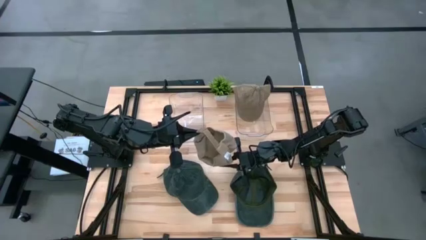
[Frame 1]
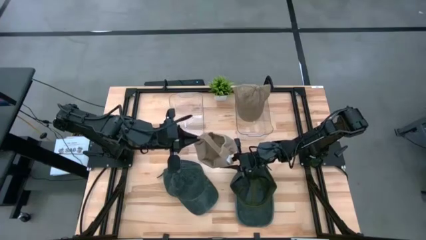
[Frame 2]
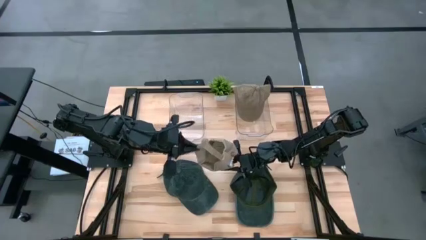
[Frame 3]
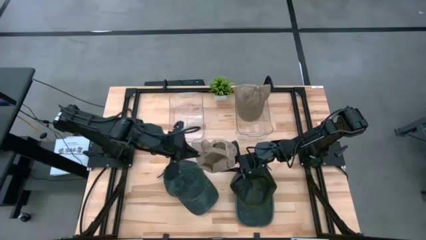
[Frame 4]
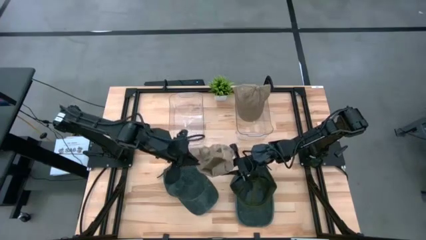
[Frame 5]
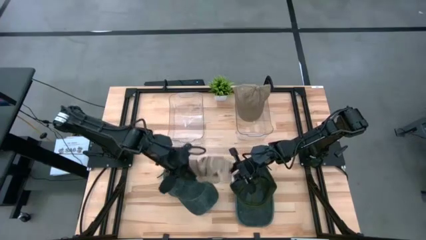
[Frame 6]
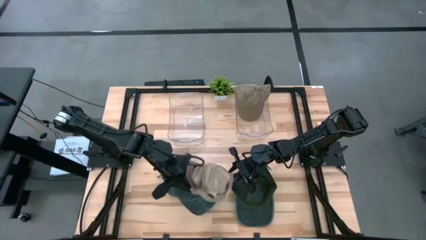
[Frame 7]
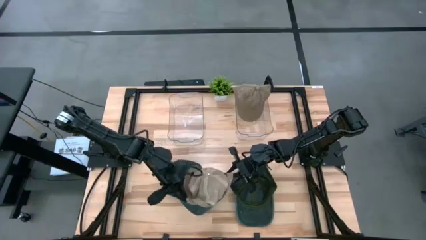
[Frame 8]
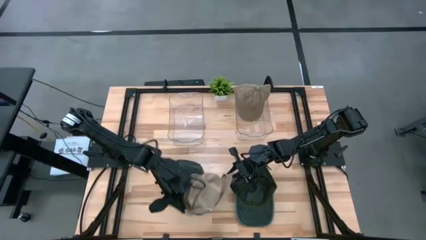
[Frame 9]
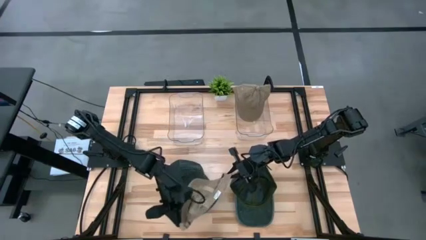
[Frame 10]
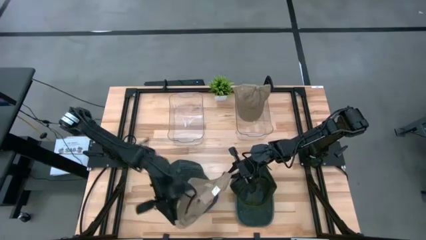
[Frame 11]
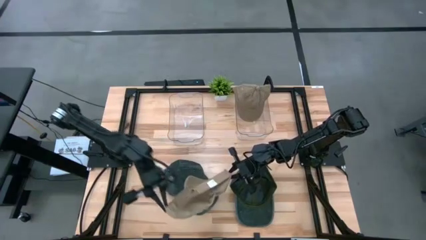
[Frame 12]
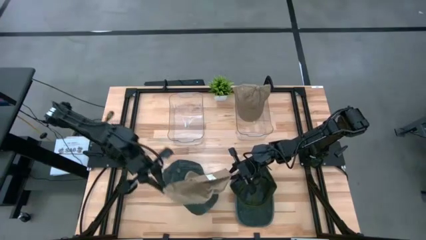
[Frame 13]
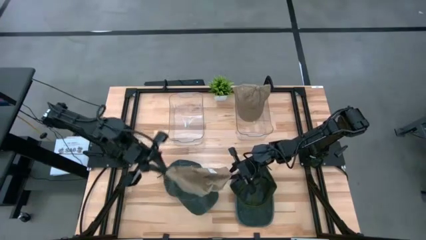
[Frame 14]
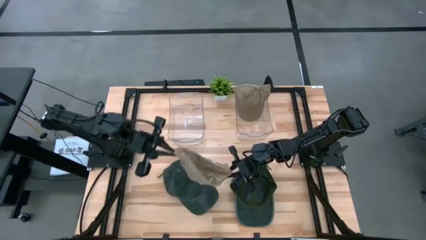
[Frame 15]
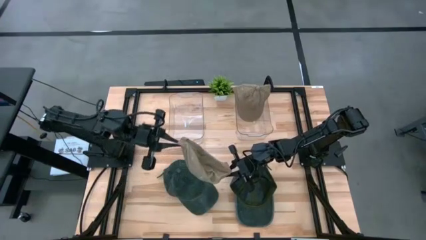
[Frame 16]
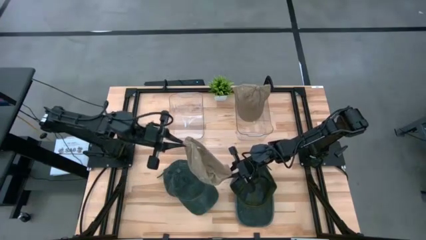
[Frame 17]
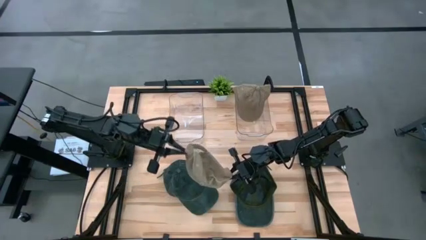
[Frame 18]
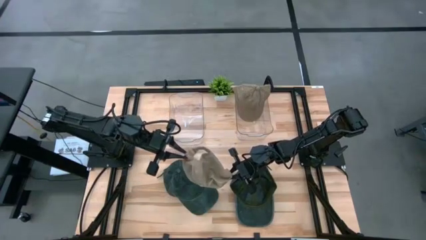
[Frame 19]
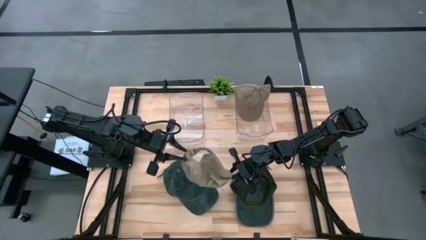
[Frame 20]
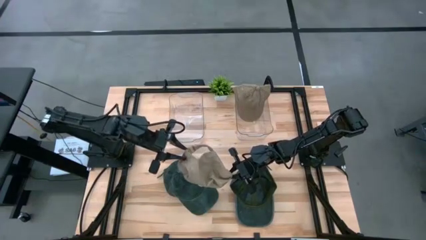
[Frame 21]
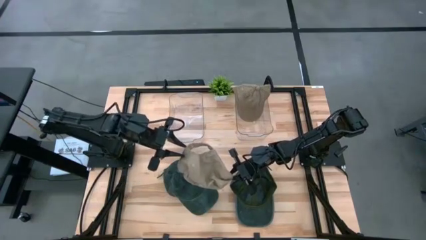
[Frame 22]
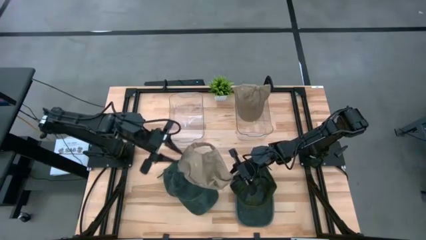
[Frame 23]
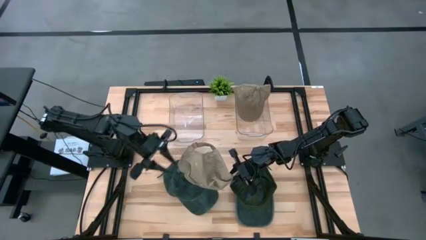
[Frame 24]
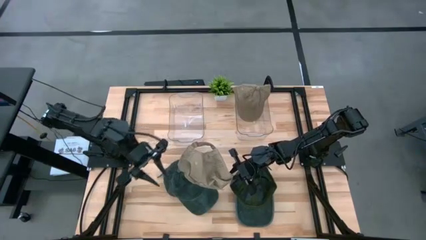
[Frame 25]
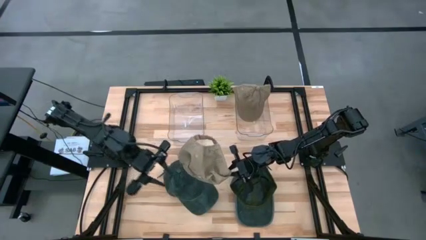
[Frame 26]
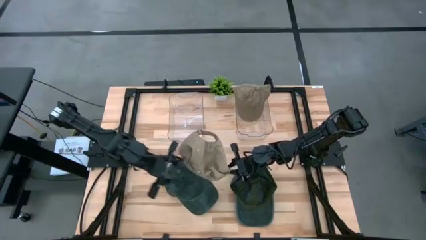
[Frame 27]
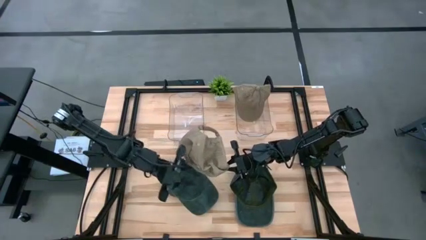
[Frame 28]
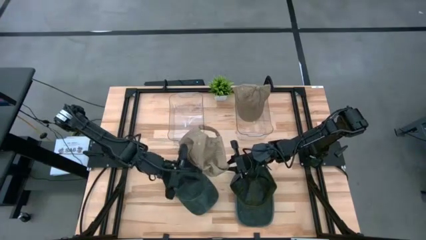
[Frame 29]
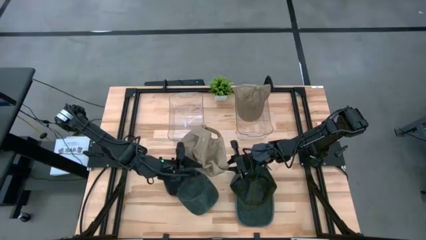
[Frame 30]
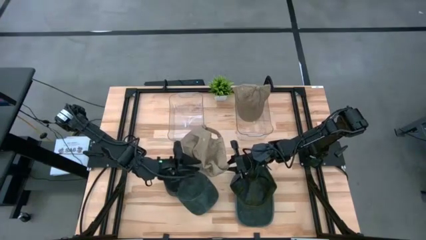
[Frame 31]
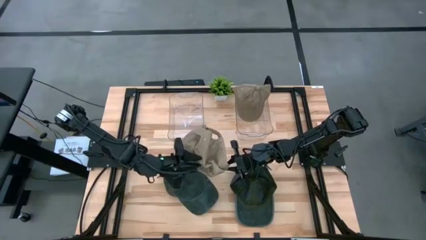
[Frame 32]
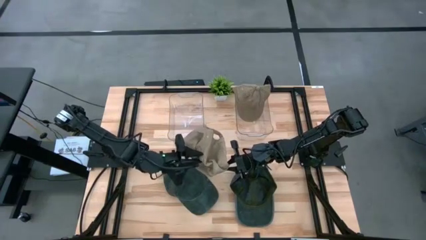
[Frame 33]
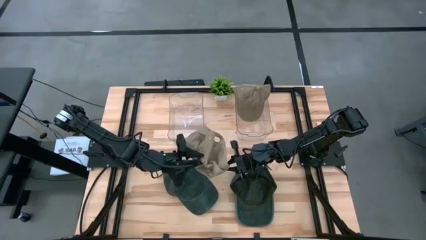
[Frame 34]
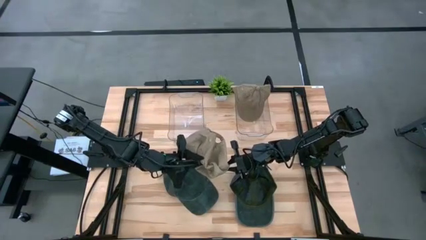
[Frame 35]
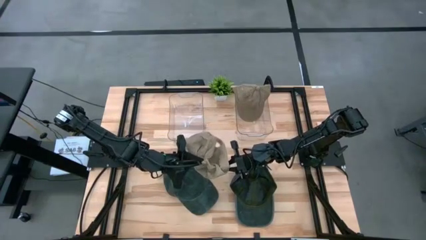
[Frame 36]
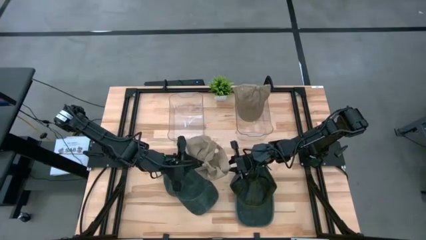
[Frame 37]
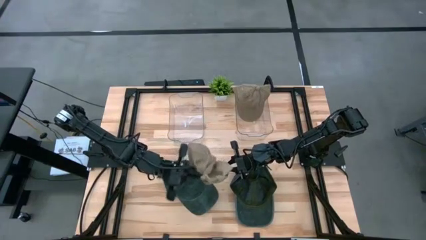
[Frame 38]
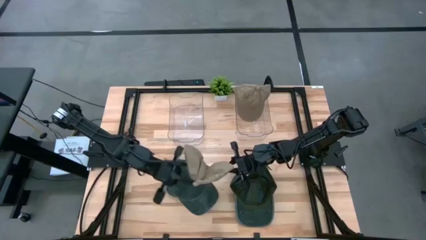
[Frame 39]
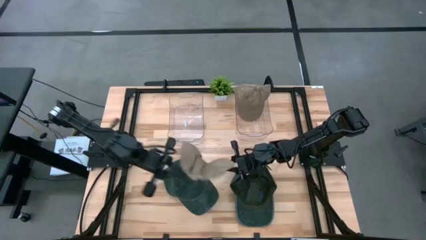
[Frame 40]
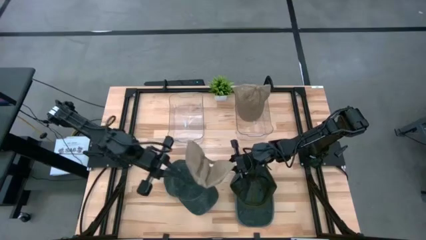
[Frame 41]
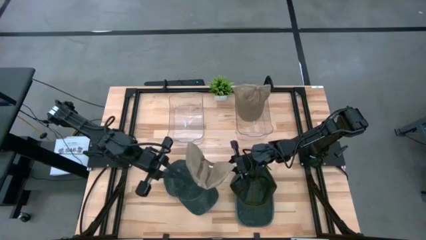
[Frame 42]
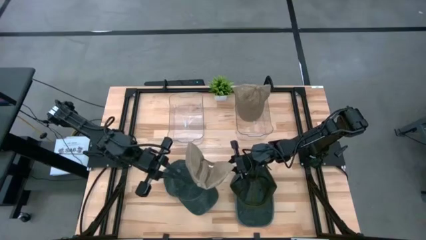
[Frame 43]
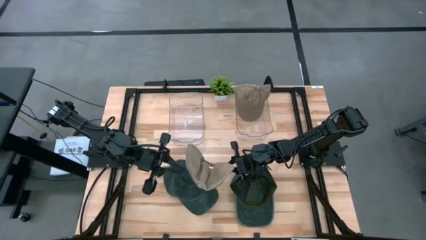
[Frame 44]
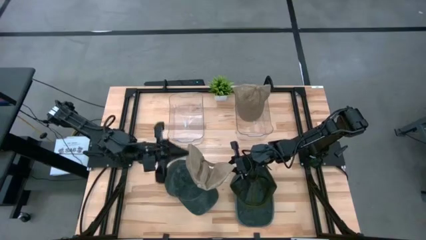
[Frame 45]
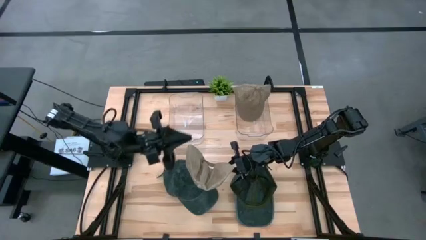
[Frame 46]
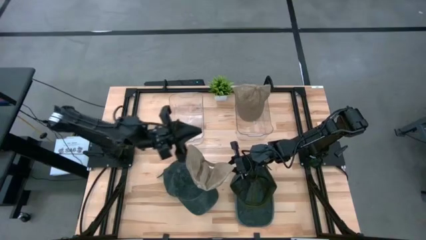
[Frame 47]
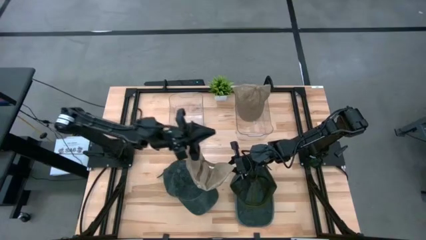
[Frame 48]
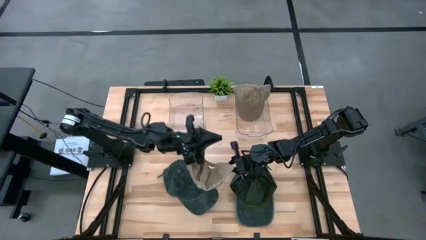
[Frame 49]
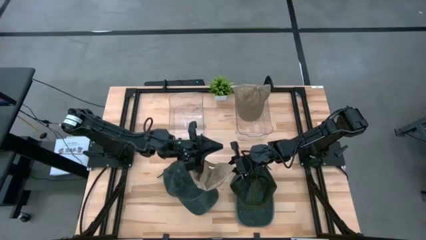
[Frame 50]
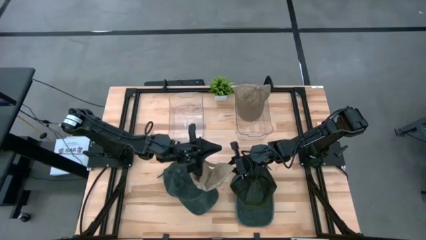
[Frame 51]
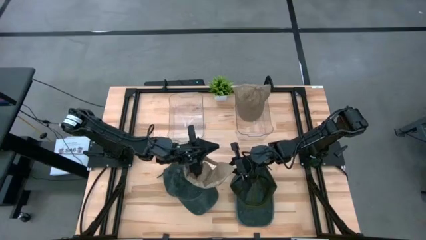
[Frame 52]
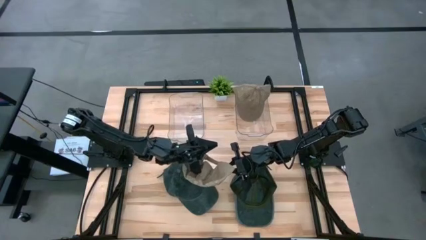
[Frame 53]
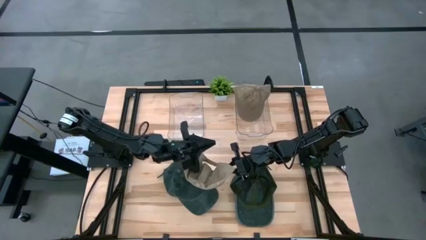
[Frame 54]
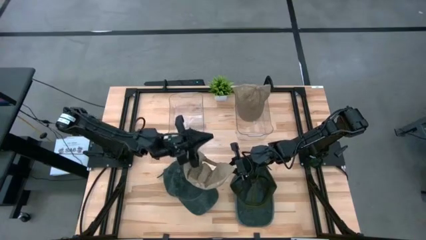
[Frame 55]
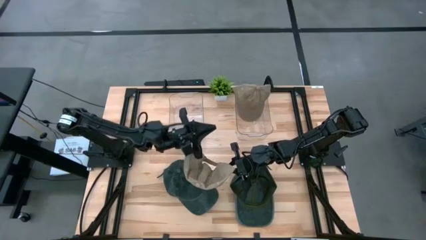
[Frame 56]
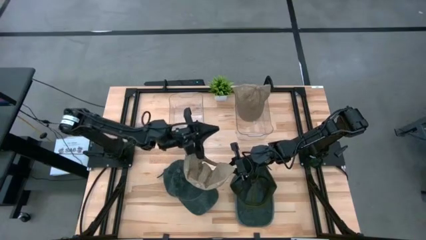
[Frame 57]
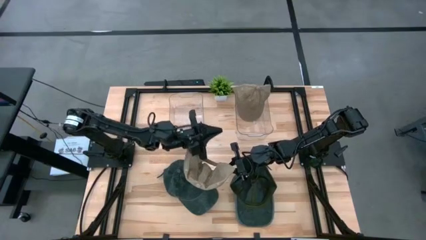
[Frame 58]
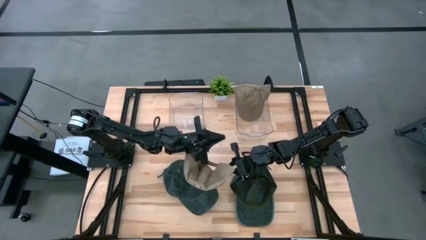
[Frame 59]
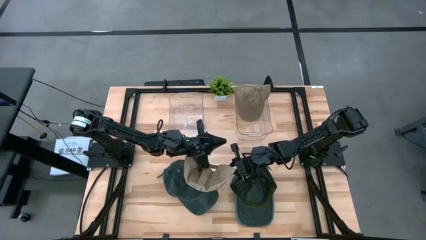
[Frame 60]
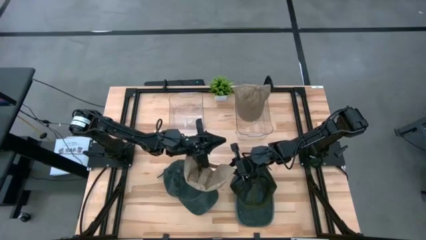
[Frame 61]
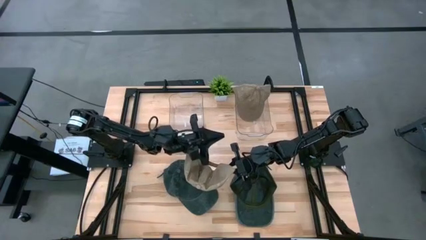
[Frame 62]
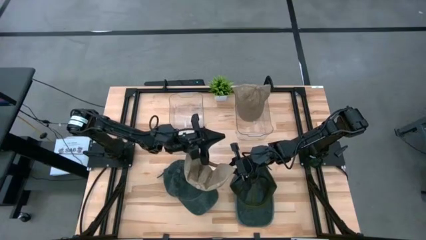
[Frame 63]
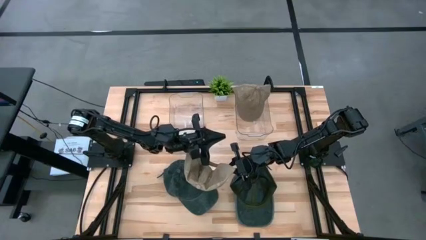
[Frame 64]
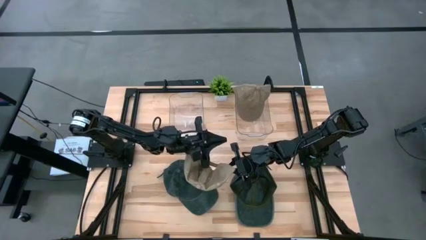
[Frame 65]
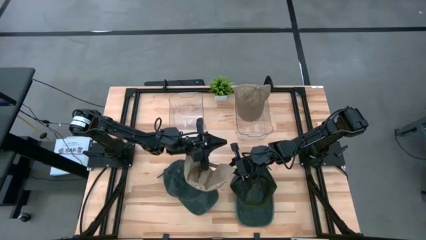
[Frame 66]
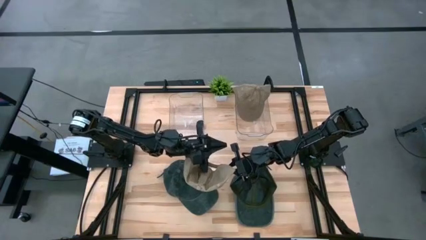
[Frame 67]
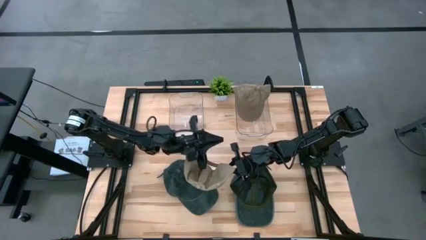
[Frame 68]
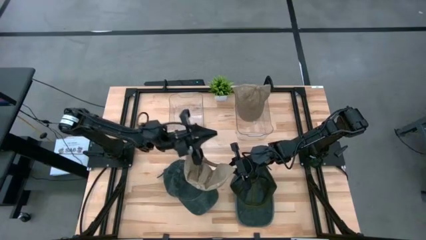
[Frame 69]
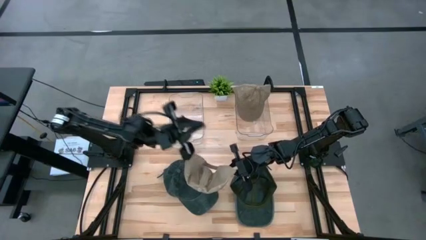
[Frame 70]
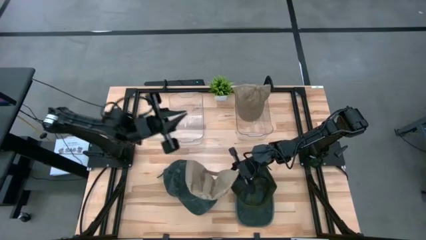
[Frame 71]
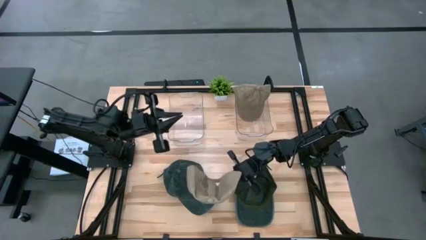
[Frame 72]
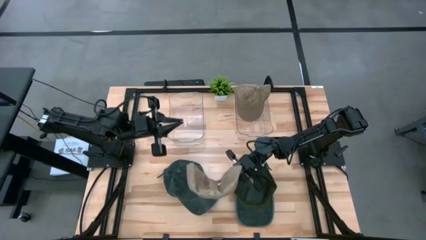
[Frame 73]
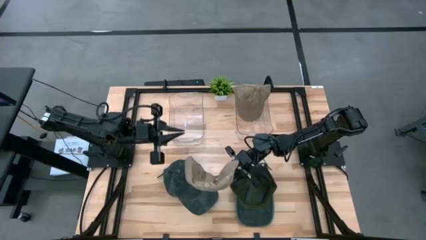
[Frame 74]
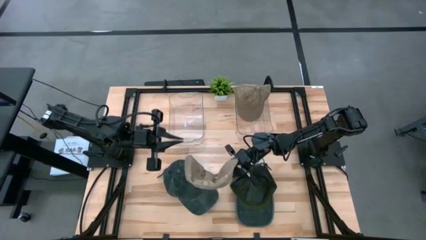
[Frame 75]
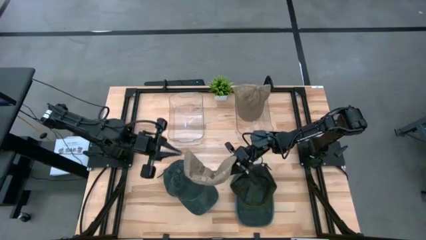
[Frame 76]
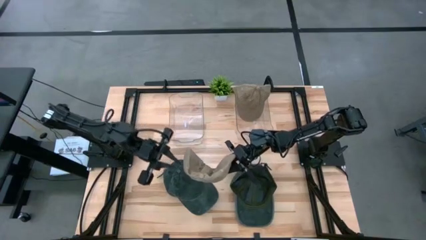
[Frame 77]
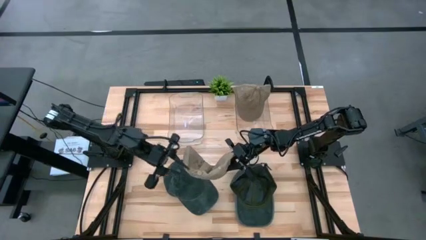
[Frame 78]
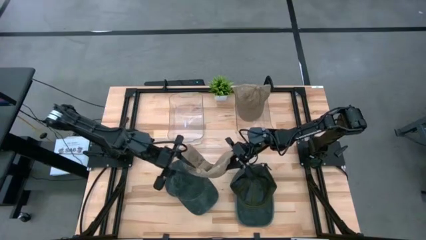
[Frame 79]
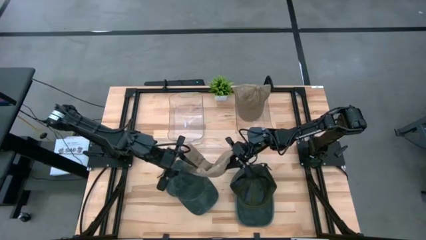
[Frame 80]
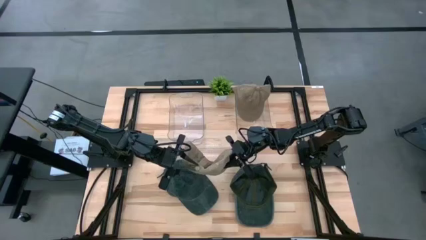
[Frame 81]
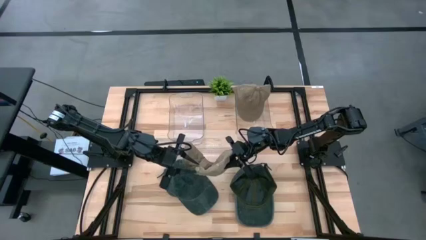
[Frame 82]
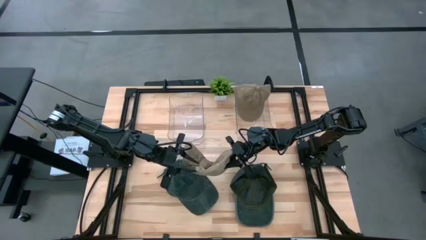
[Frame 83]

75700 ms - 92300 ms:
Task: Pick & Place hat
Put the brown cap into the right transparent bin
